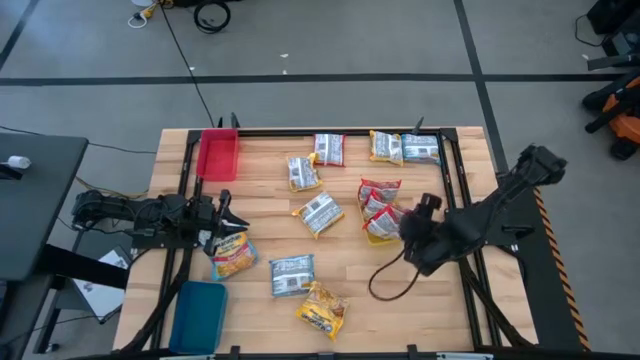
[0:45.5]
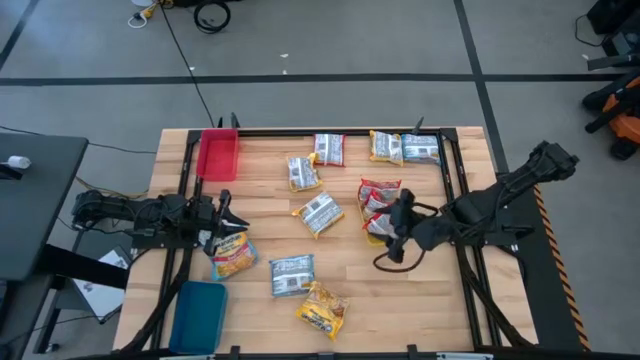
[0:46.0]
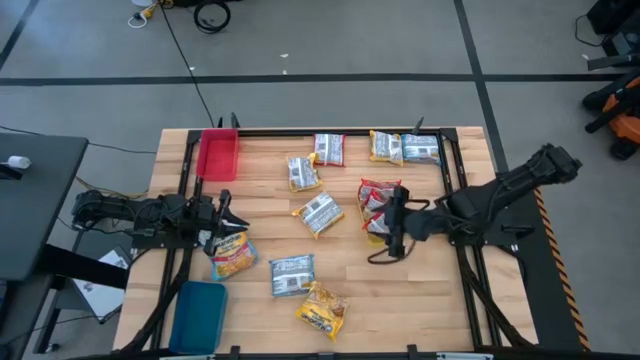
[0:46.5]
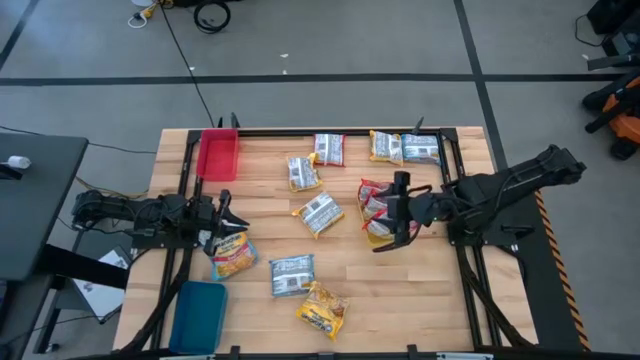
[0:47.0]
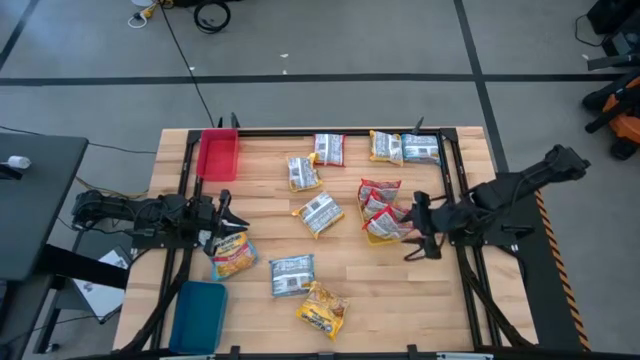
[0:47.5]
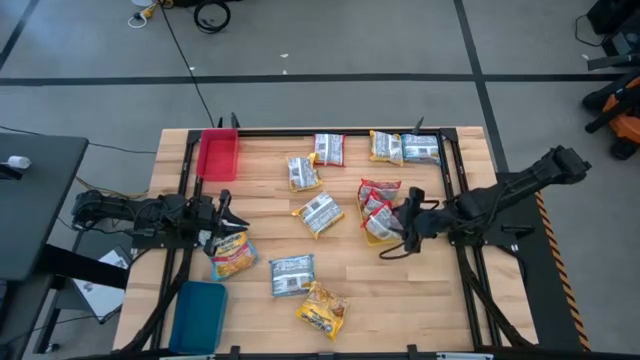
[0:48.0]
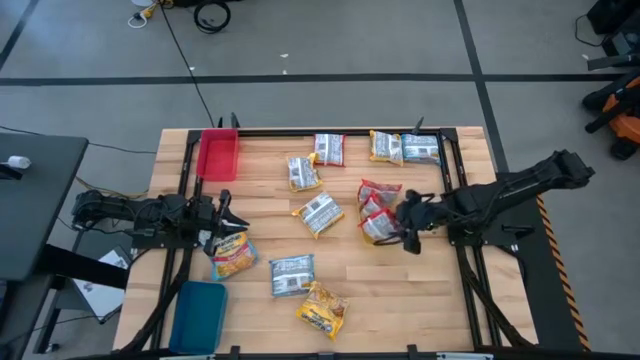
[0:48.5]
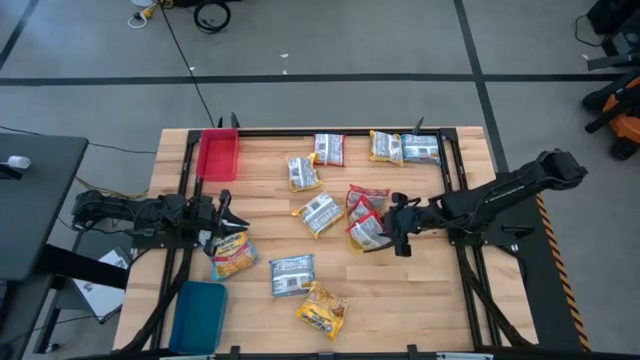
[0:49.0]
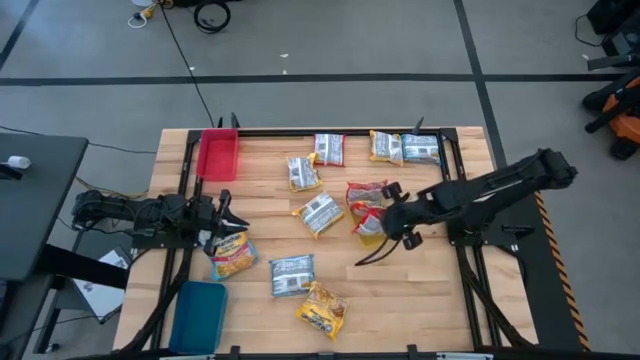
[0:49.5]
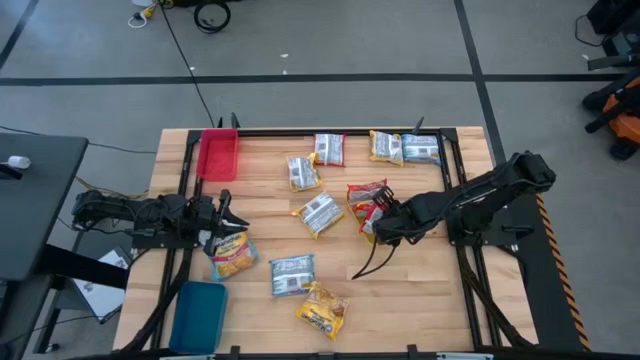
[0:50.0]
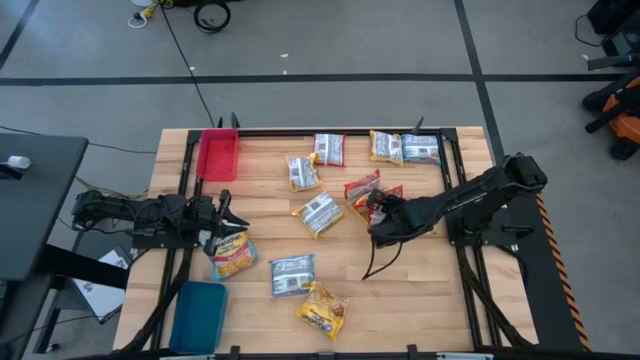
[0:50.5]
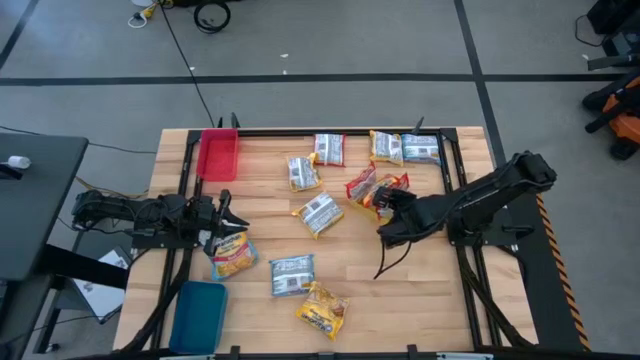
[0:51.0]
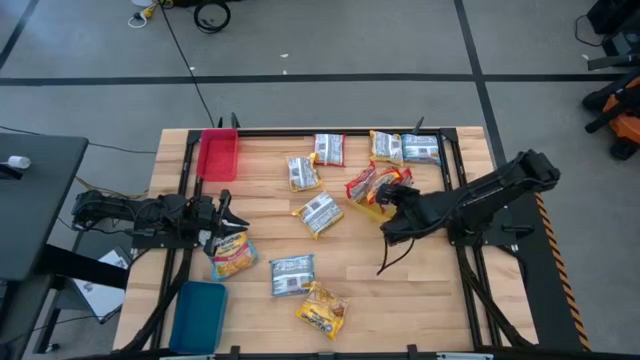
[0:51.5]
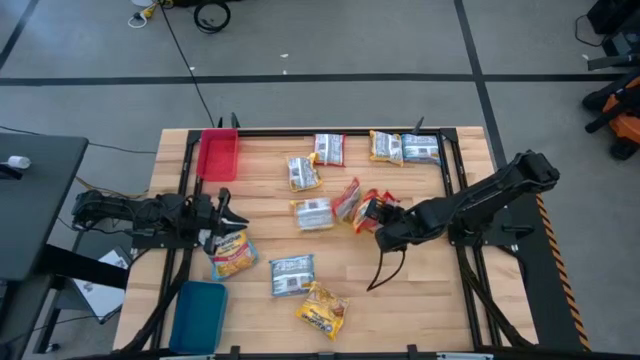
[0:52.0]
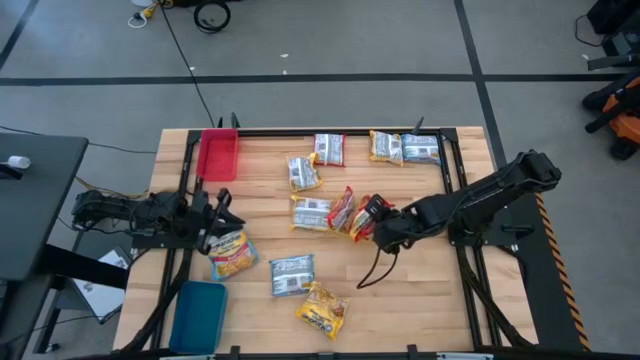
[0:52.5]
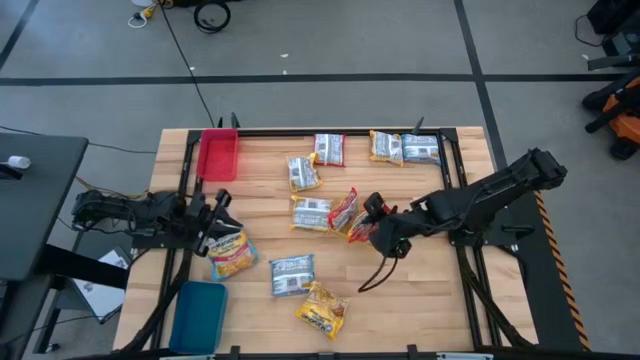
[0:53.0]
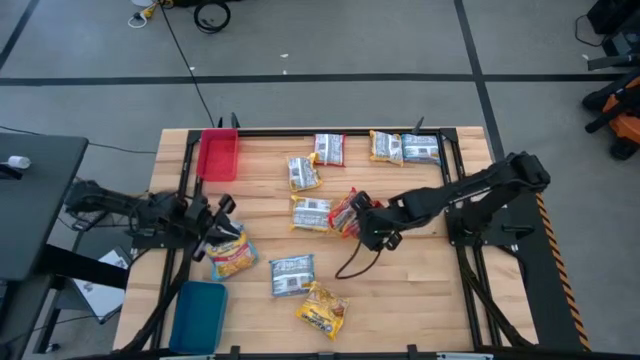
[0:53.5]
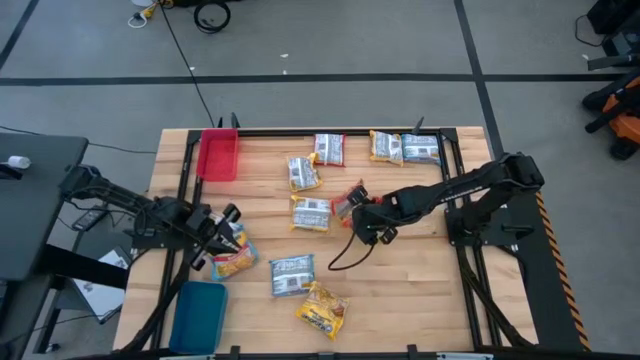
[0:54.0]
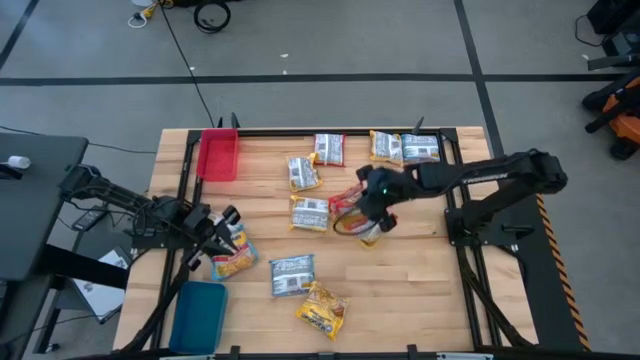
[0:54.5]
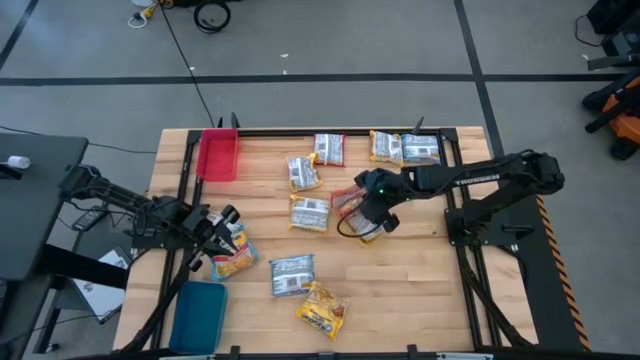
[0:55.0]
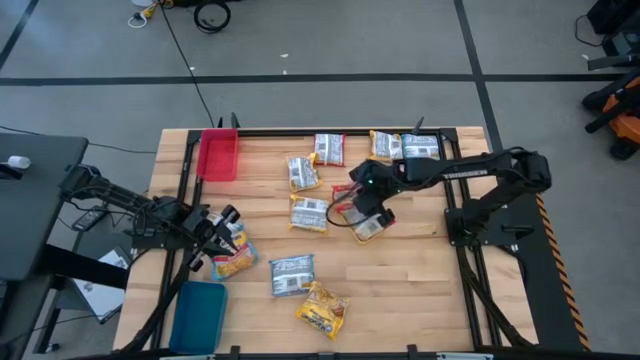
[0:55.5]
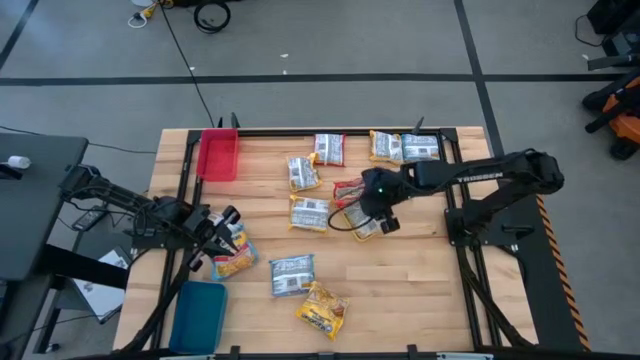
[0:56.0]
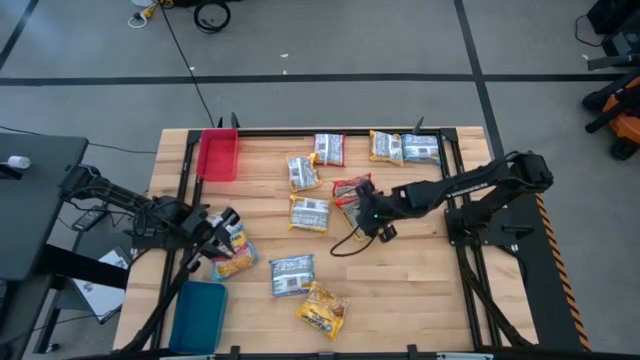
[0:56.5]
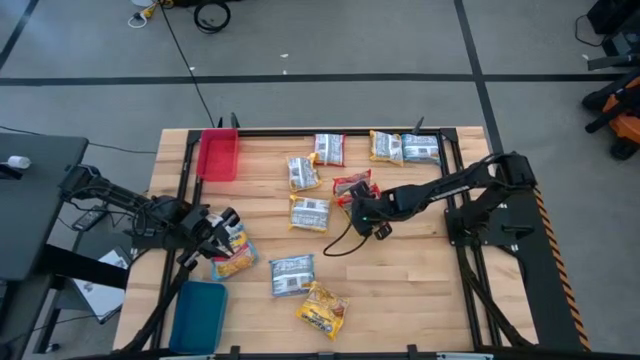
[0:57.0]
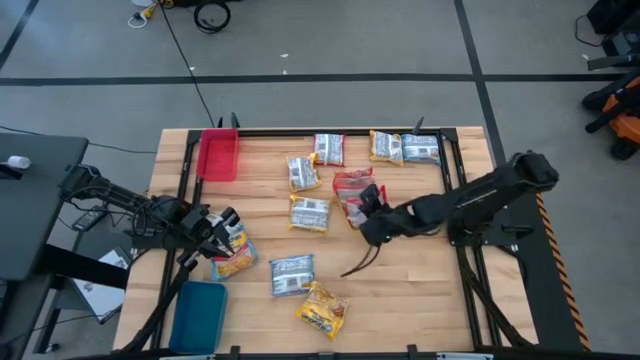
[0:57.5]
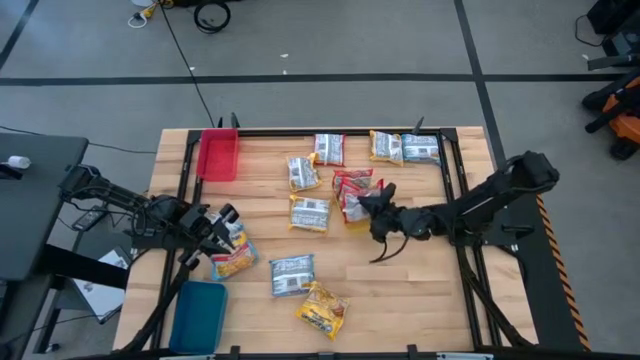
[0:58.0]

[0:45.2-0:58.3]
Task: Sort Maruchan noodles
Adjust the red noodle packs in the yellow bin

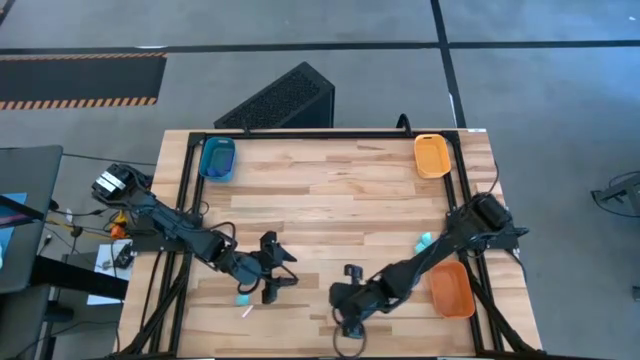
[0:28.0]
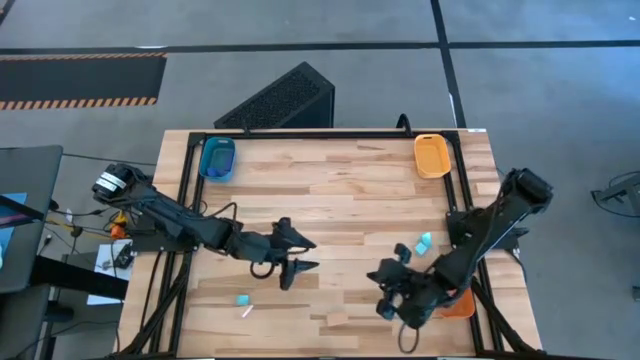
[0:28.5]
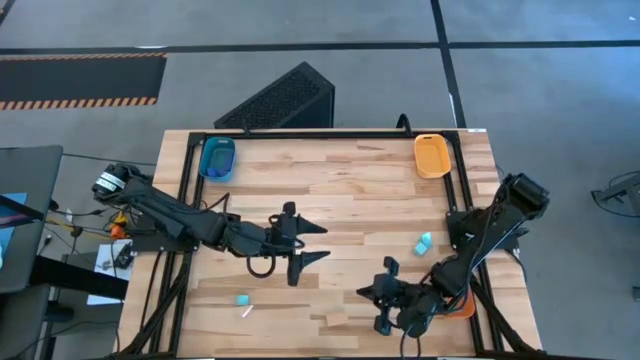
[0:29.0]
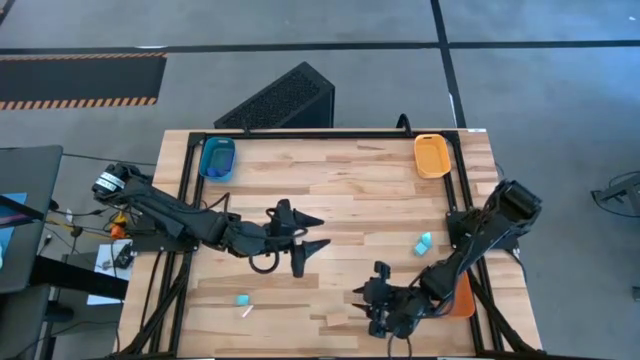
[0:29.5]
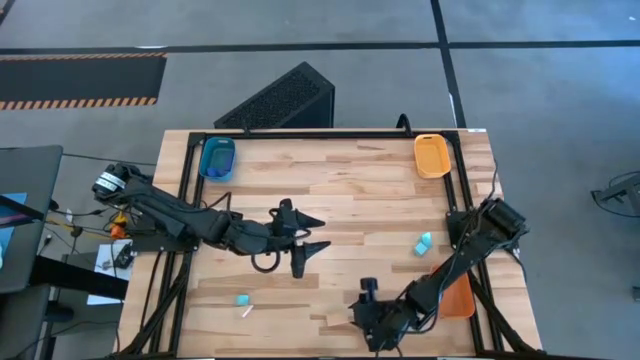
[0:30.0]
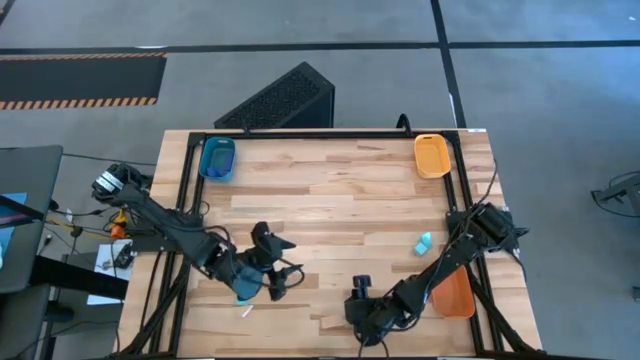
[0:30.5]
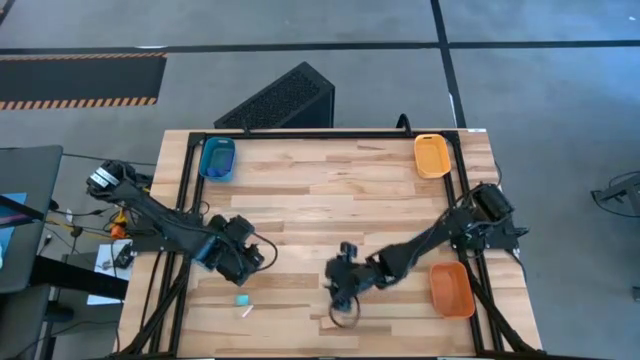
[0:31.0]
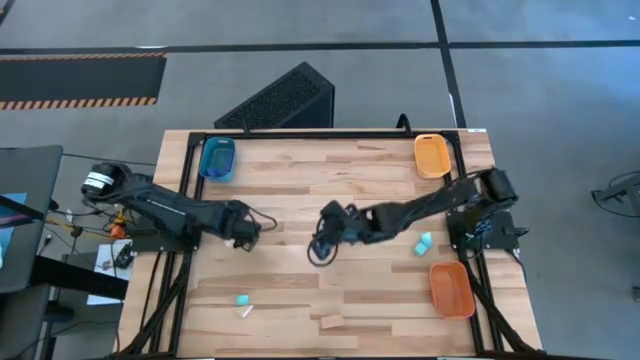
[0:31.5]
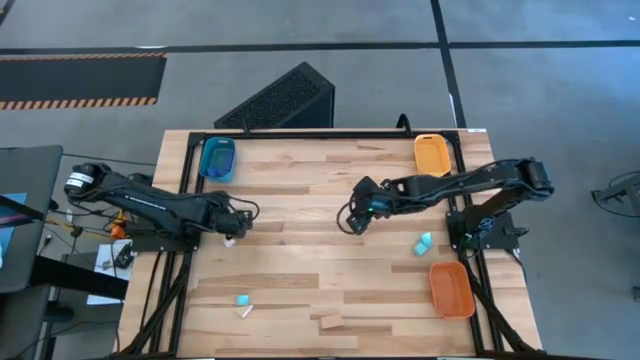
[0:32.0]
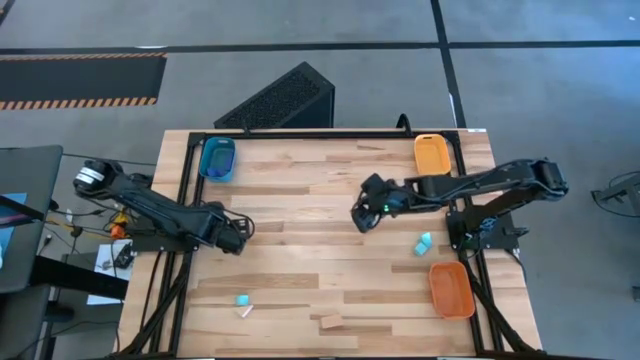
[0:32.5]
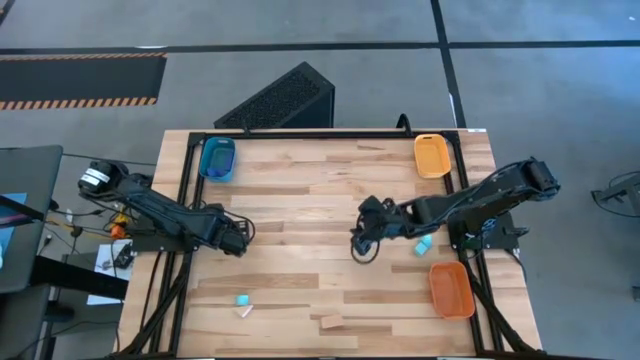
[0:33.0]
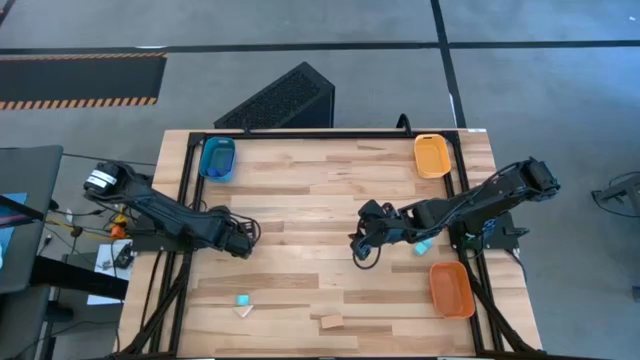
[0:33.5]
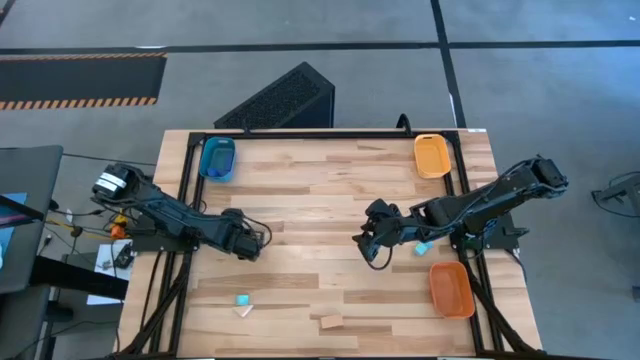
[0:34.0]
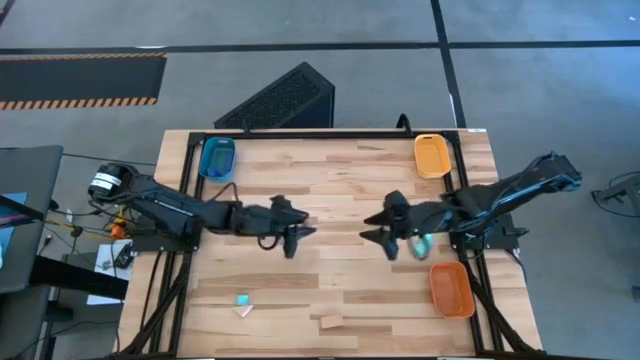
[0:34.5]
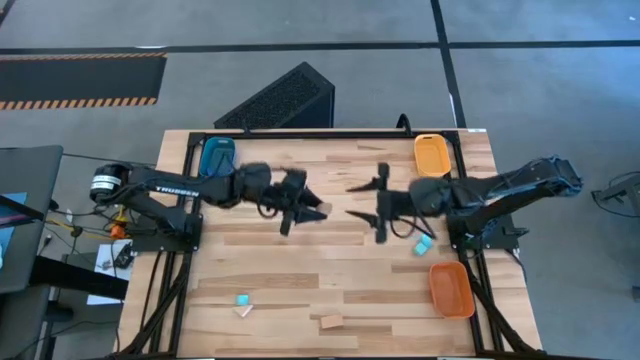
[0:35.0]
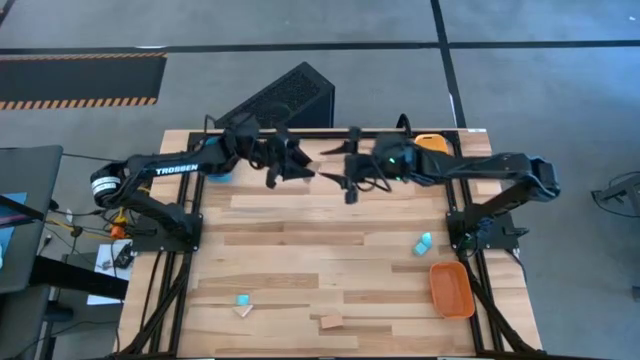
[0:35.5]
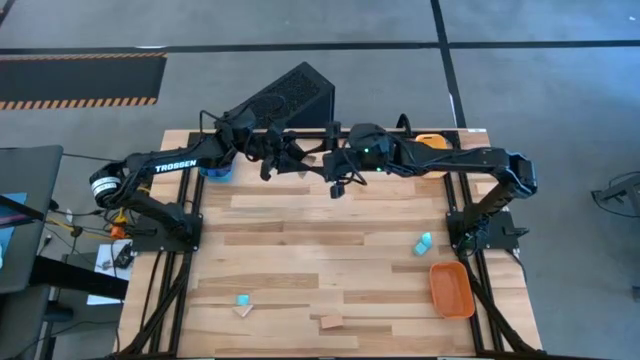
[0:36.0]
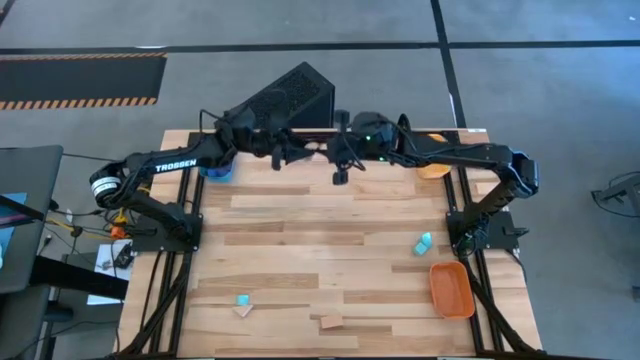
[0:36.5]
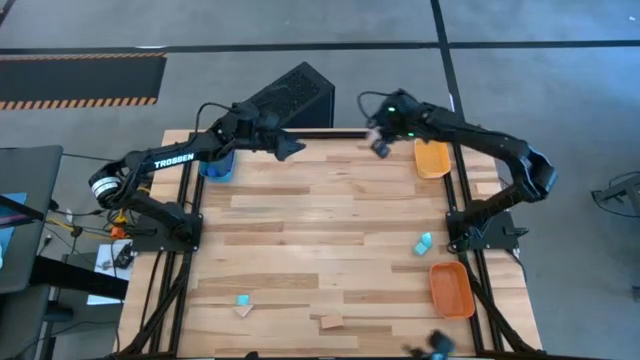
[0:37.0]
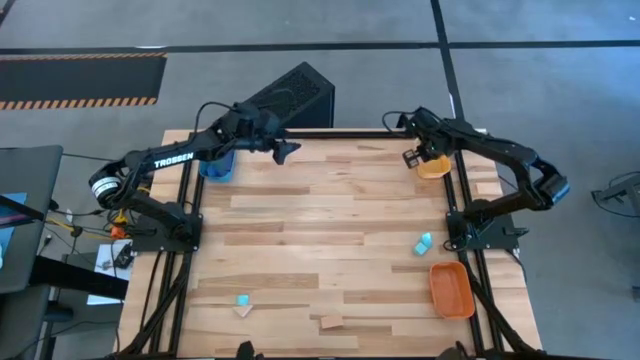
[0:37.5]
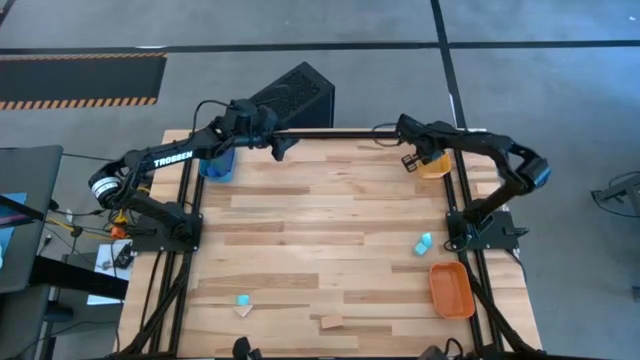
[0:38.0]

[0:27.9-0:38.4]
Task: Sort & place blocks by color
Put the top left brown block into the yellow bin
